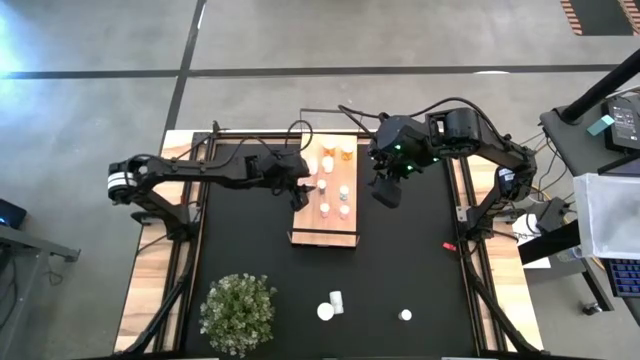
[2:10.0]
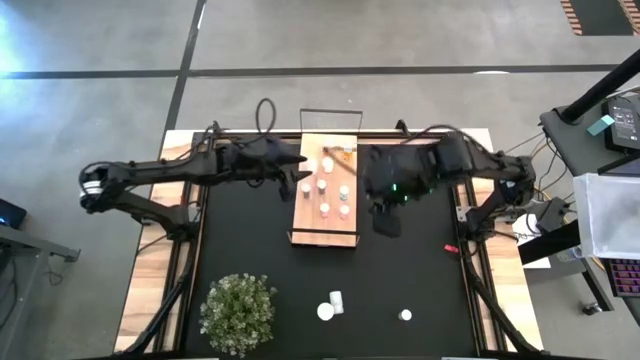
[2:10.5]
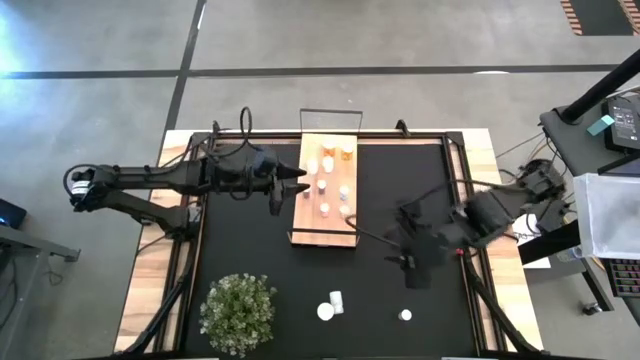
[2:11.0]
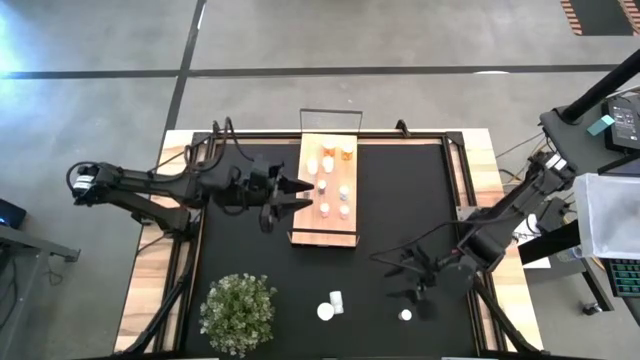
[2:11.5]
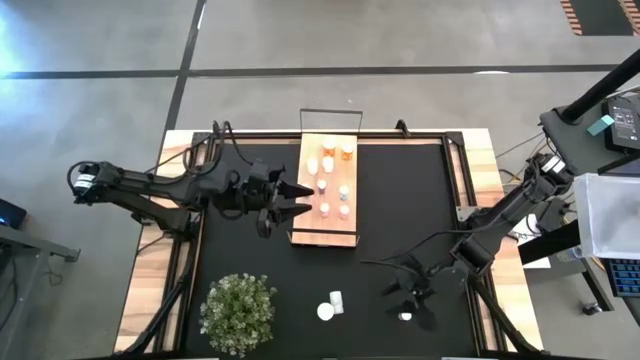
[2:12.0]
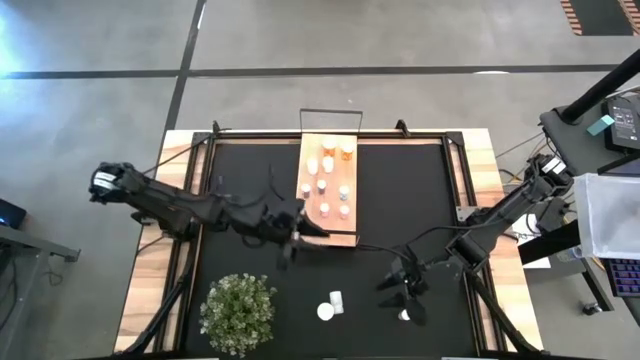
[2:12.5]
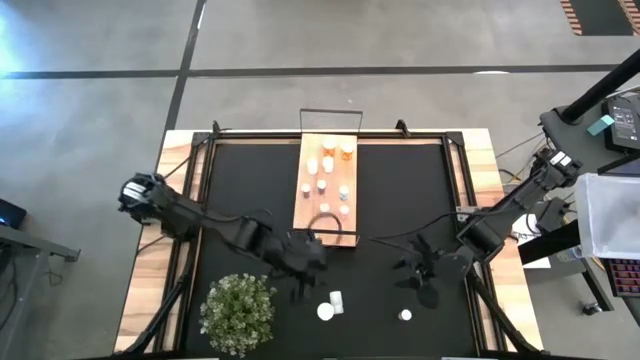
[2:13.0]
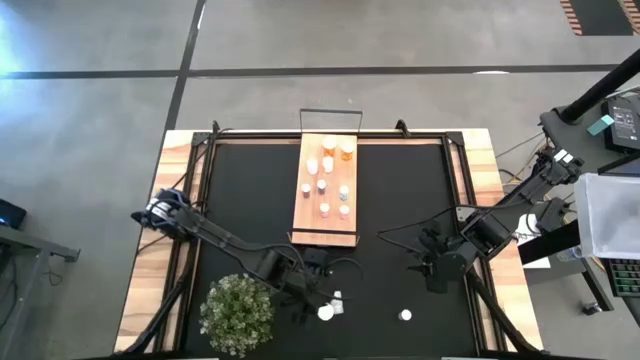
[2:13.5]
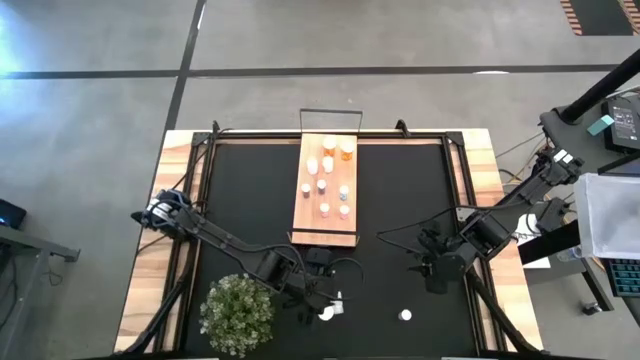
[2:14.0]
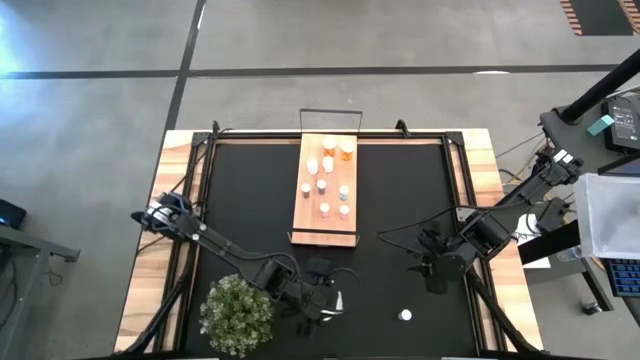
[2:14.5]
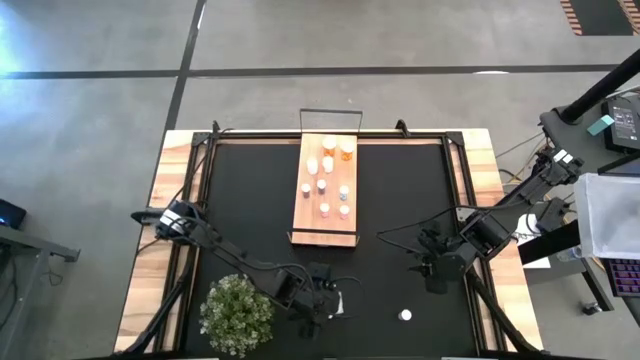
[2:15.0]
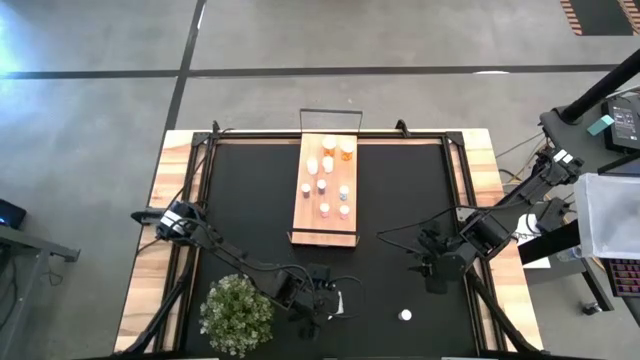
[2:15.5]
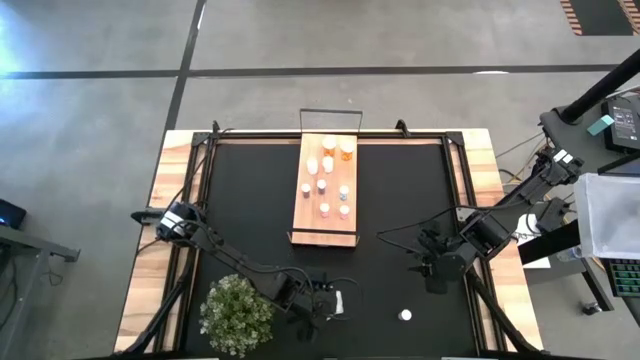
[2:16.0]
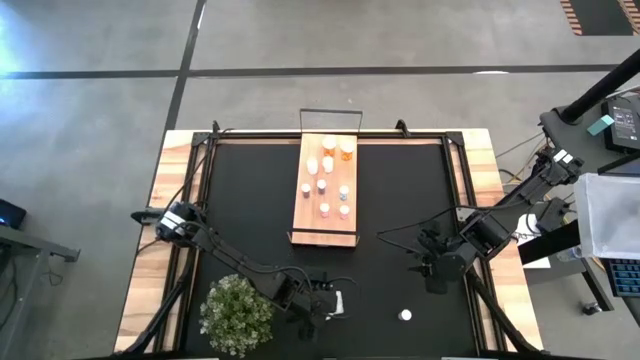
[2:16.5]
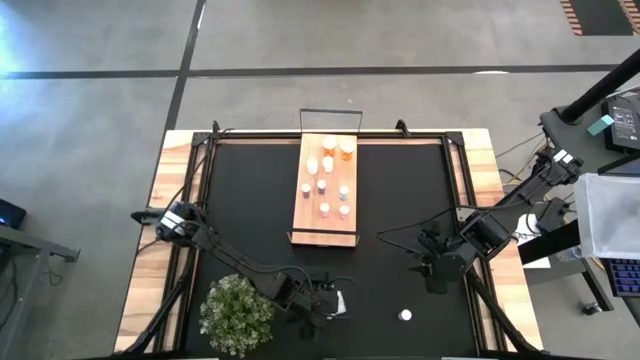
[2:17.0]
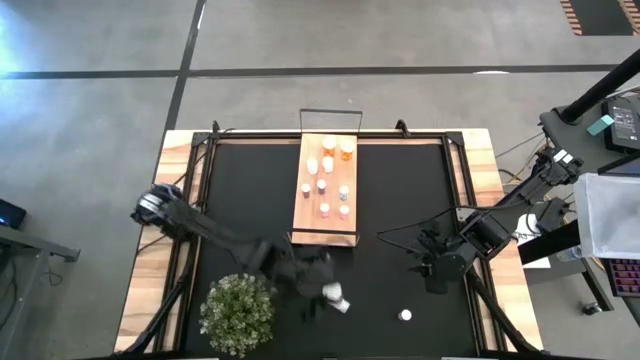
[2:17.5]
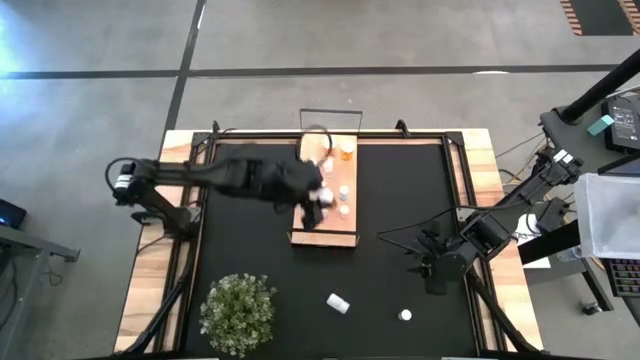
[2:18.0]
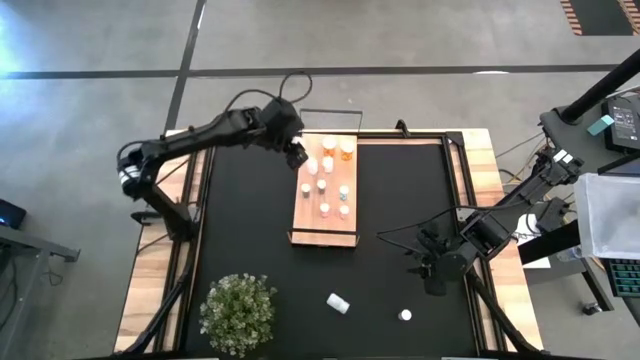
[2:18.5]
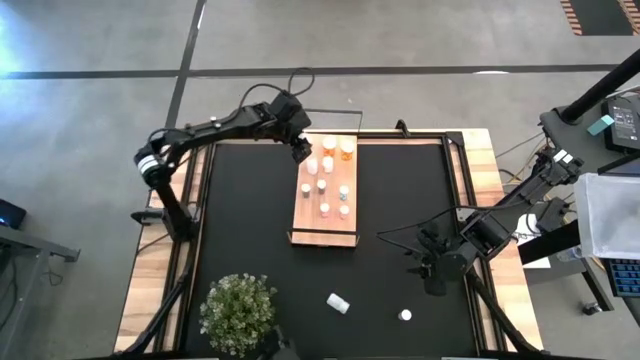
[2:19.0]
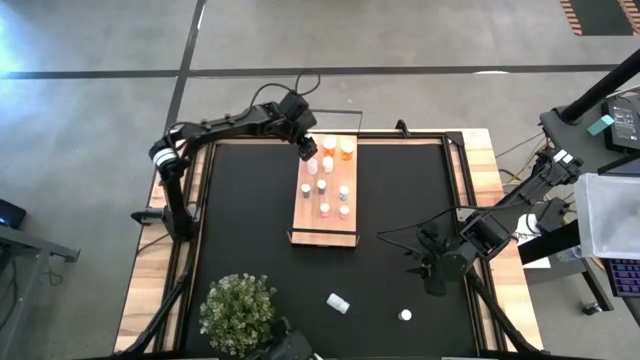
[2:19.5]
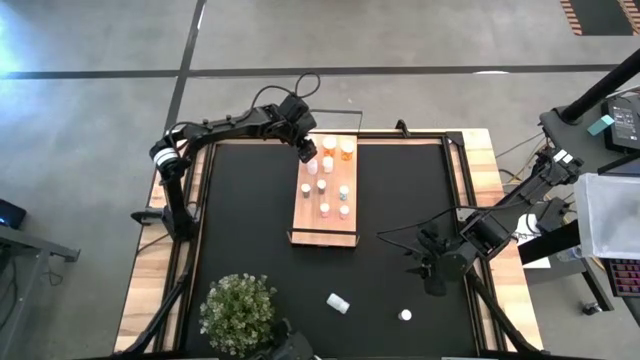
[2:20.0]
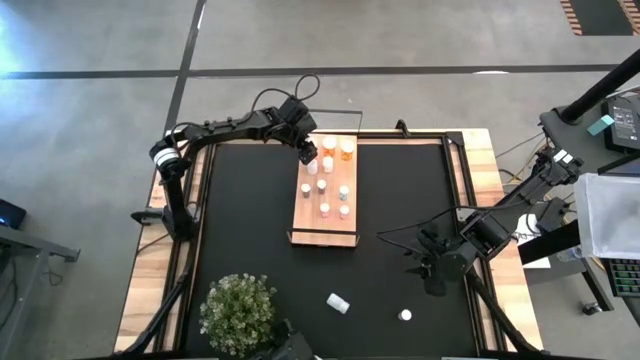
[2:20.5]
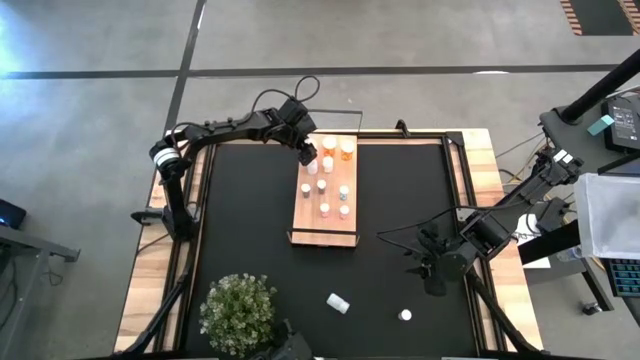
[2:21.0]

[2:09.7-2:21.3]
Task: Pick and place medicine bottles onto shelf by color
Put the orange pill bottle on the shelf aligned with the other orange pill bottle

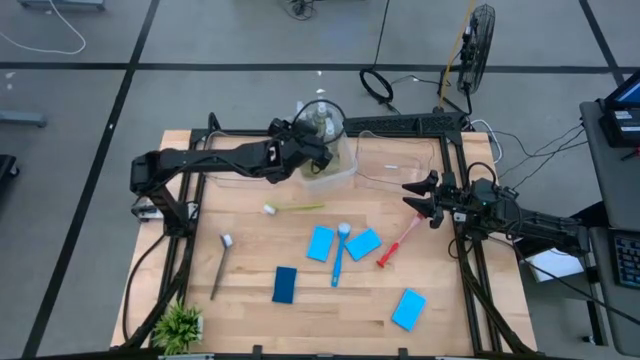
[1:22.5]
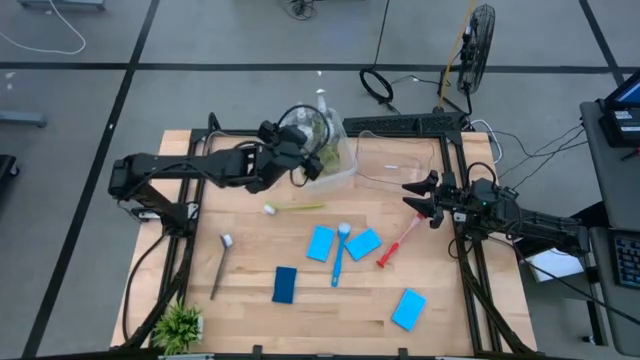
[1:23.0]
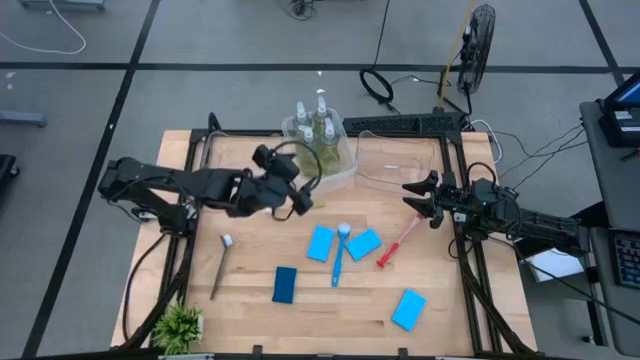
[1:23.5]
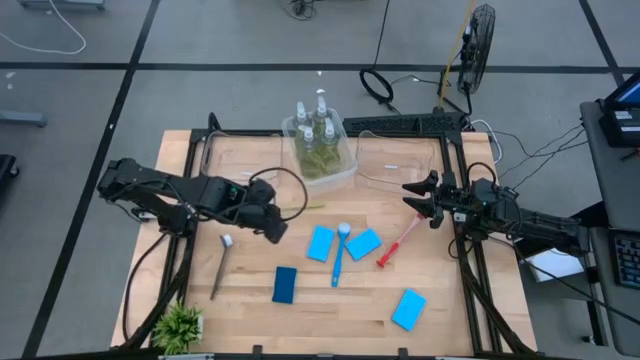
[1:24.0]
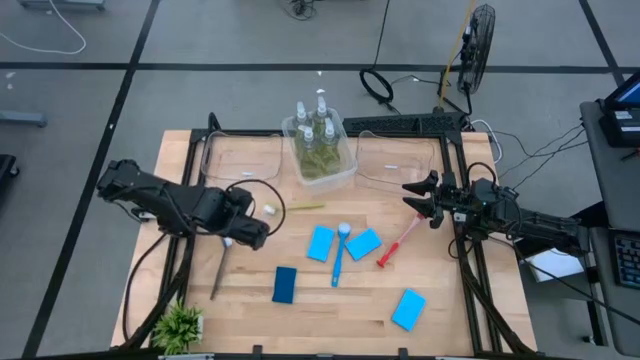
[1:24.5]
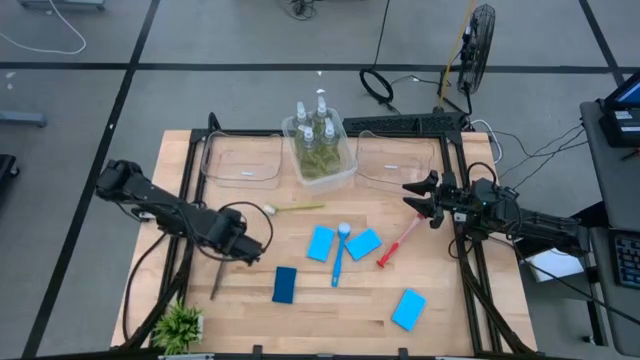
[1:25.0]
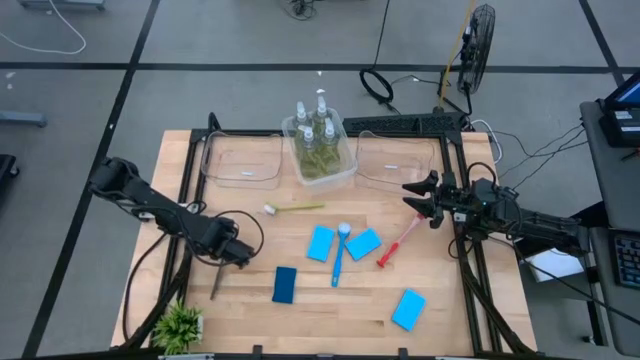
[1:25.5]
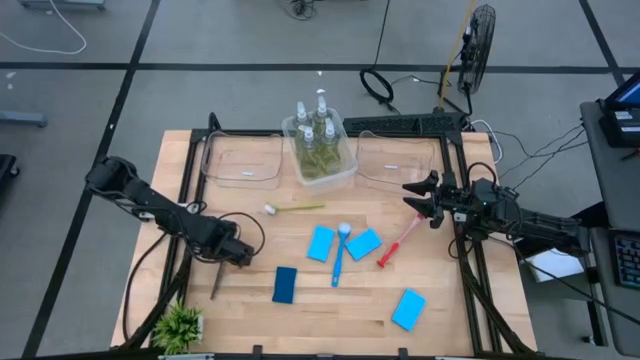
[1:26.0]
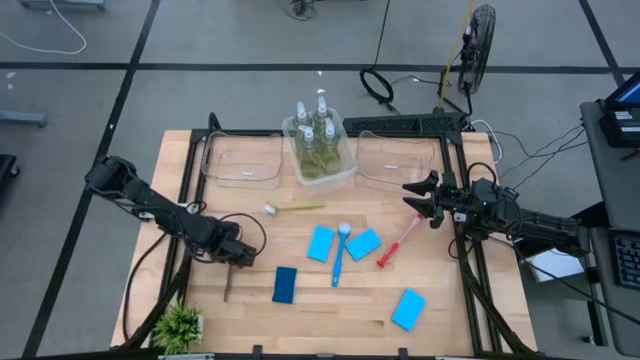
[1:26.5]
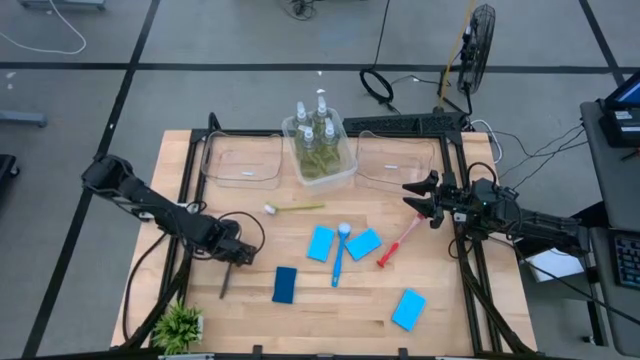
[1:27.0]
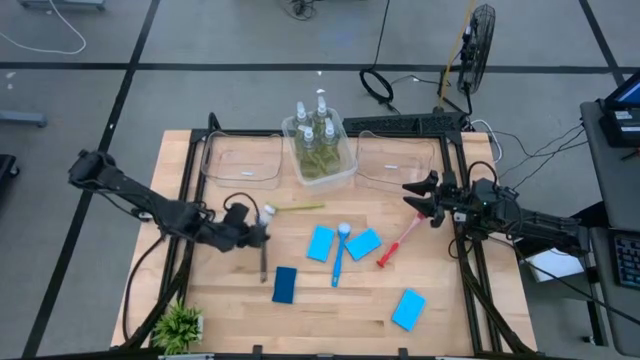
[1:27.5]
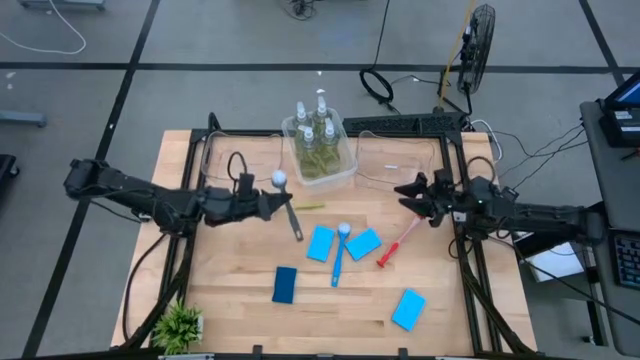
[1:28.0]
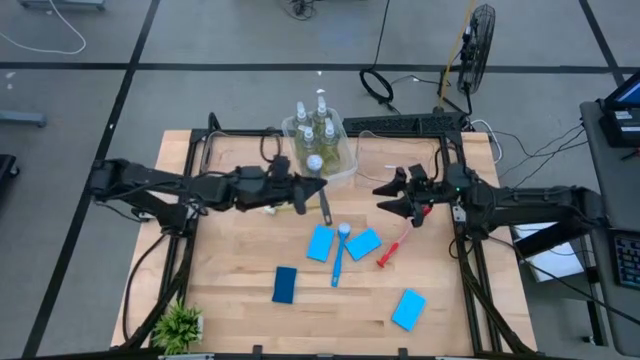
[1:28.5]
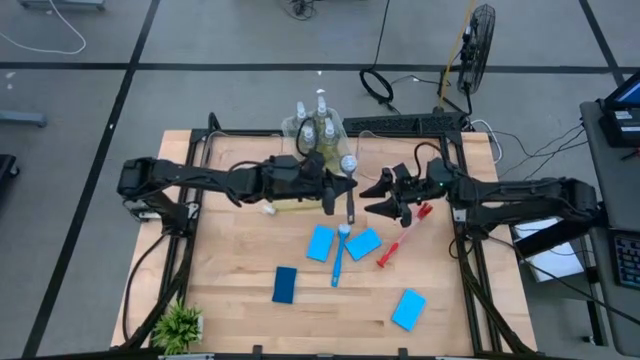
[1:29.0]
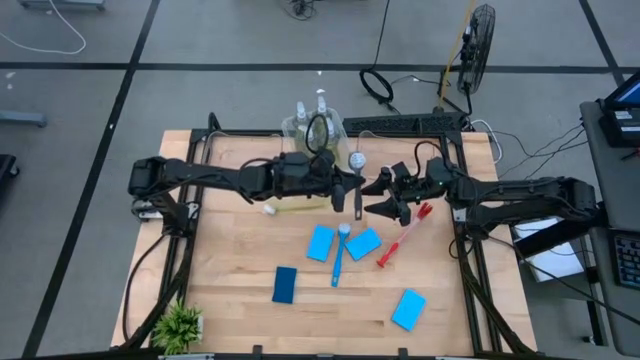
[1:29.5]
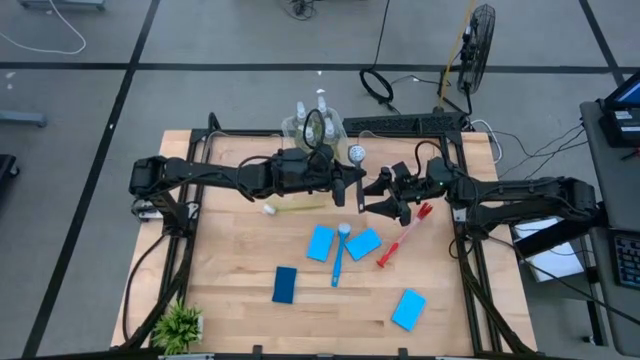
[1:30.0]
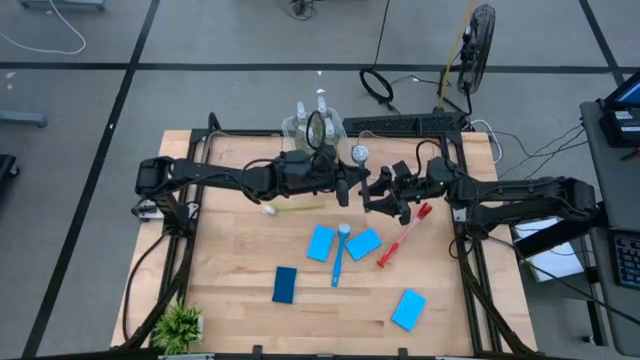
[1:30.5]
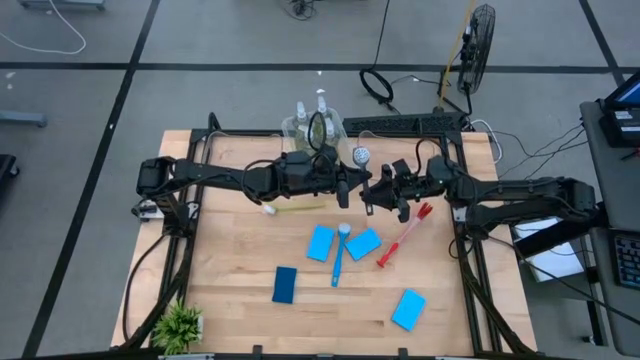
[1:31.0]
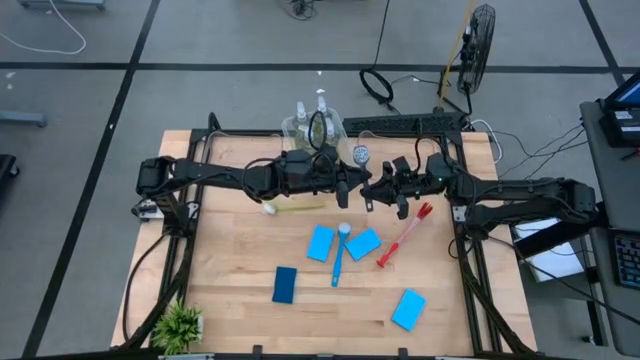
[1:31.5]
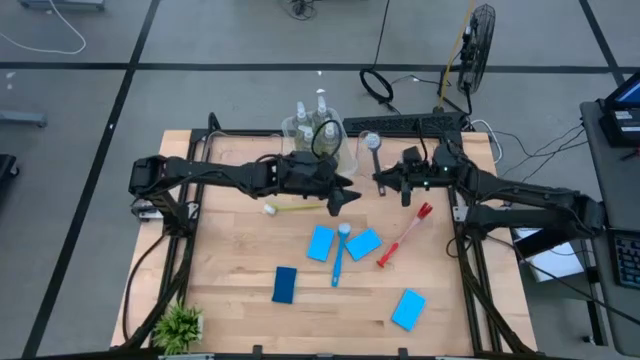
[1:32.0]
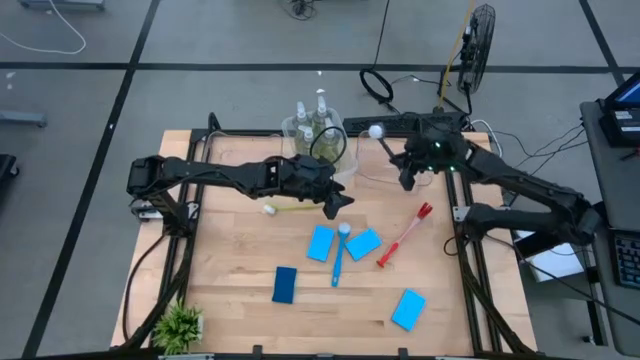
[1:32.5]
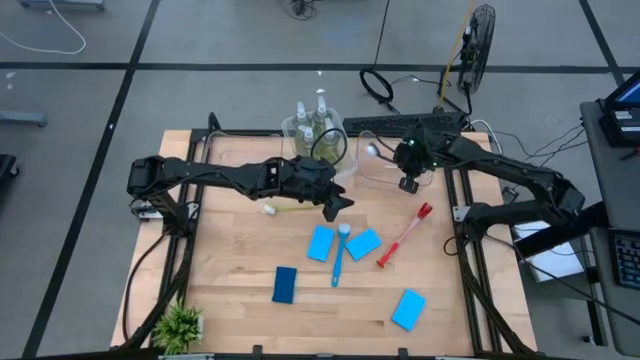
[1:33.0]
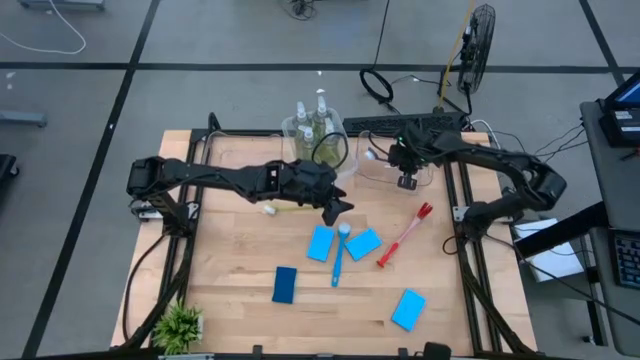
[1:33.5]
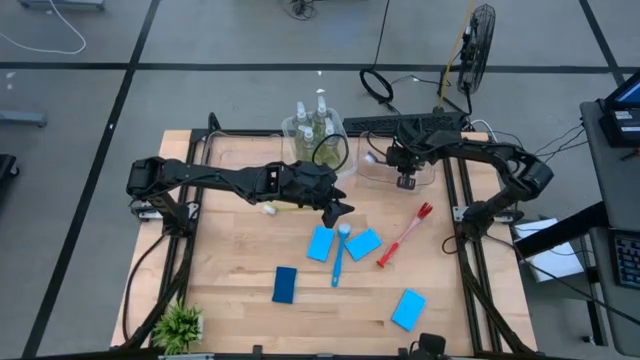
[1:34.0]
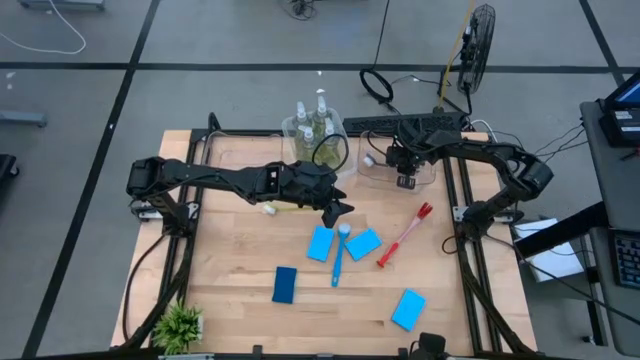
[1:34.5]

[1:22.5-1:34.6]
Task: Pick & Place Kitchen Sink Supplies
Put the gray dish brush into the right transparent bin
